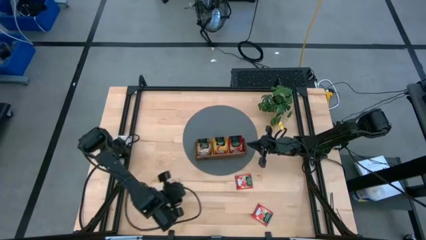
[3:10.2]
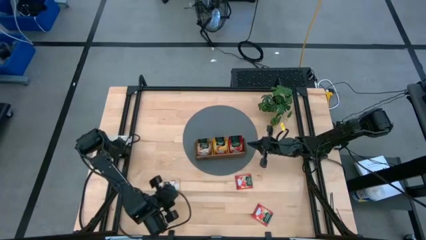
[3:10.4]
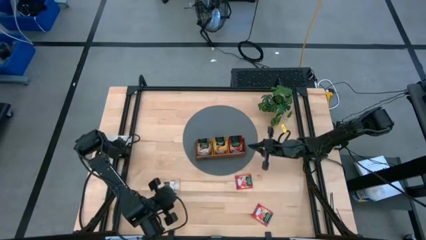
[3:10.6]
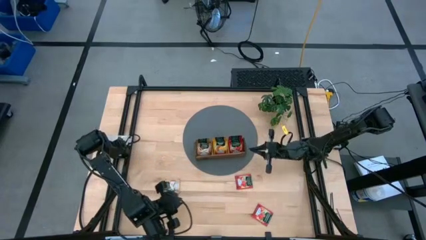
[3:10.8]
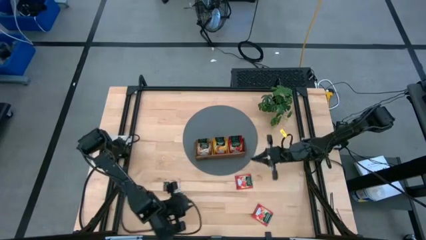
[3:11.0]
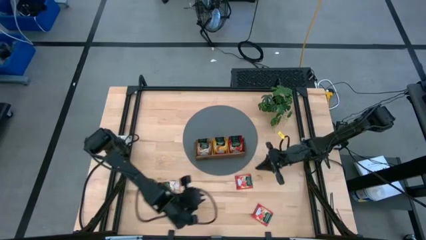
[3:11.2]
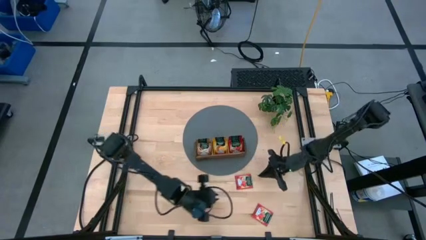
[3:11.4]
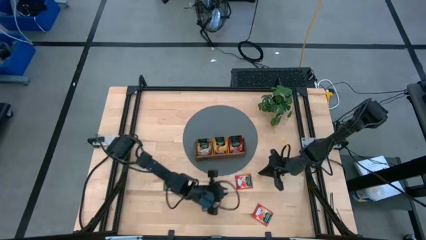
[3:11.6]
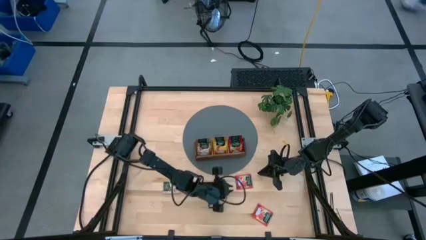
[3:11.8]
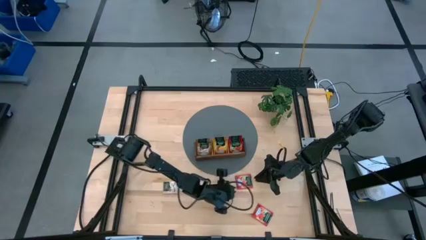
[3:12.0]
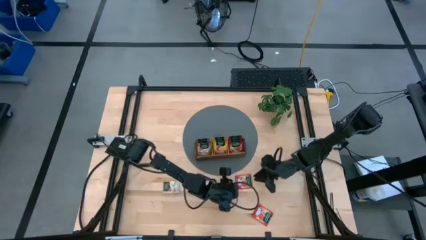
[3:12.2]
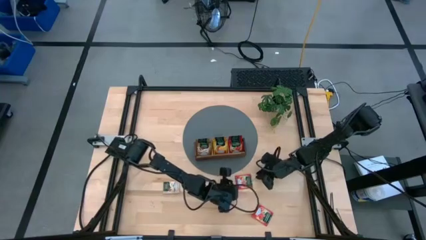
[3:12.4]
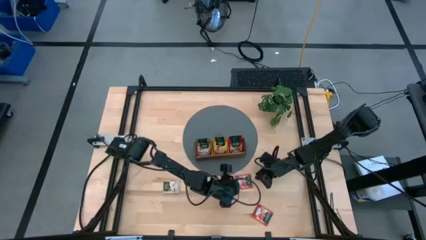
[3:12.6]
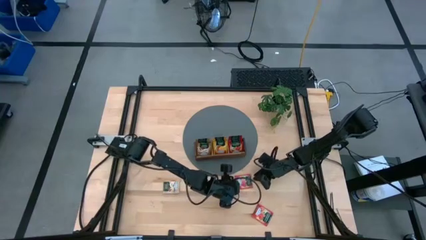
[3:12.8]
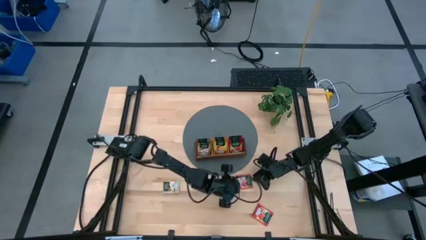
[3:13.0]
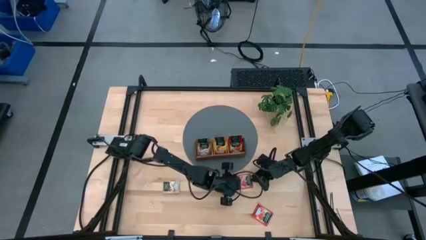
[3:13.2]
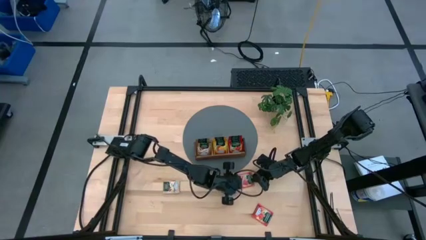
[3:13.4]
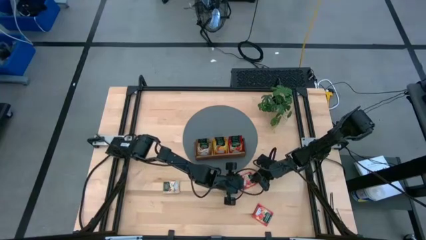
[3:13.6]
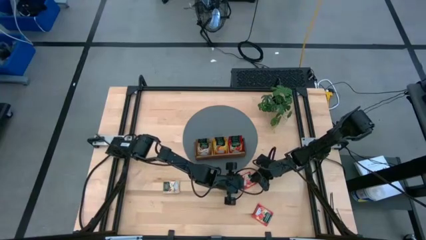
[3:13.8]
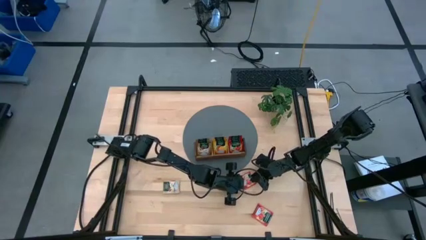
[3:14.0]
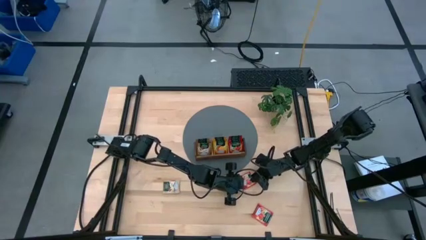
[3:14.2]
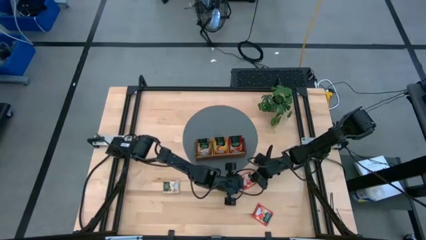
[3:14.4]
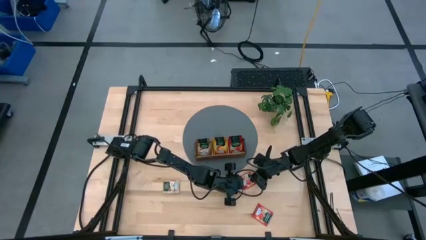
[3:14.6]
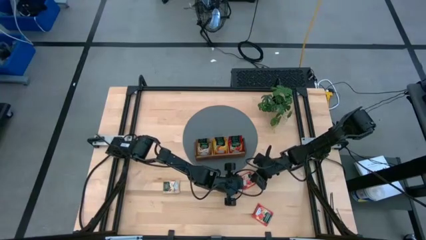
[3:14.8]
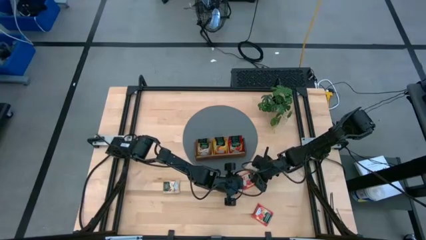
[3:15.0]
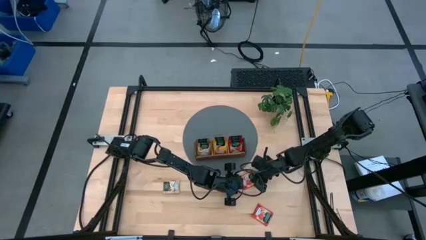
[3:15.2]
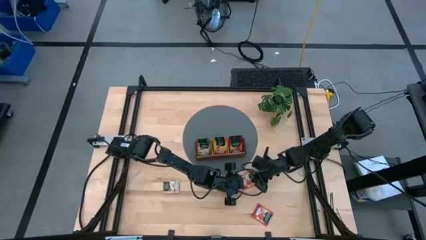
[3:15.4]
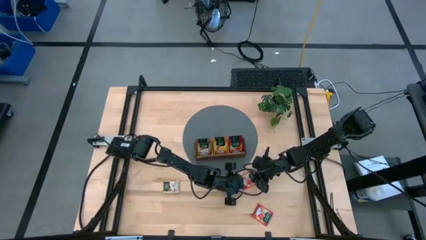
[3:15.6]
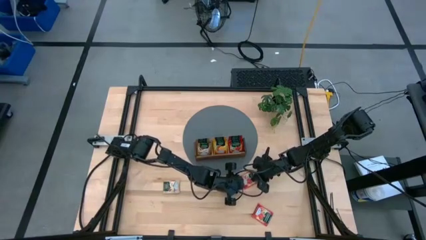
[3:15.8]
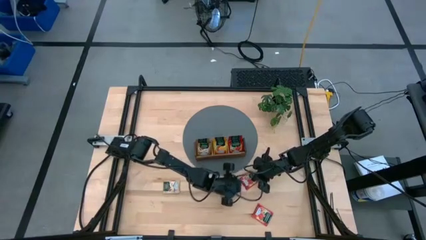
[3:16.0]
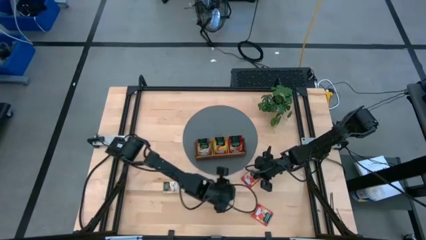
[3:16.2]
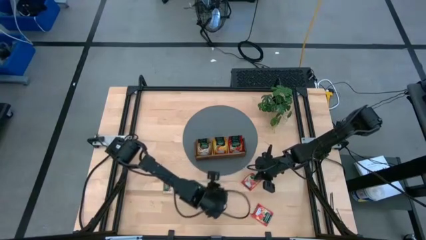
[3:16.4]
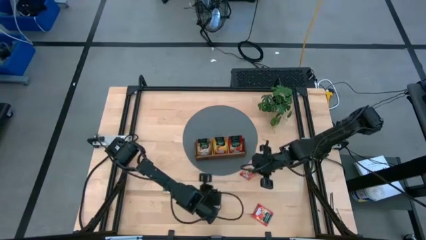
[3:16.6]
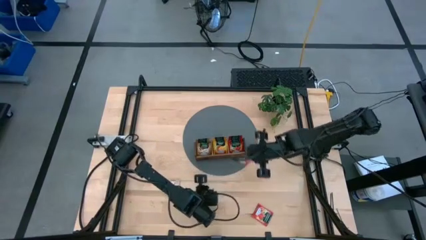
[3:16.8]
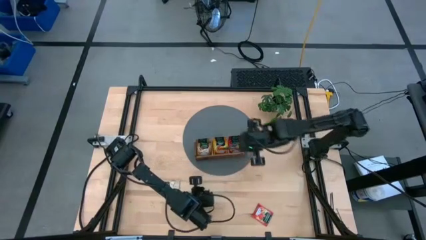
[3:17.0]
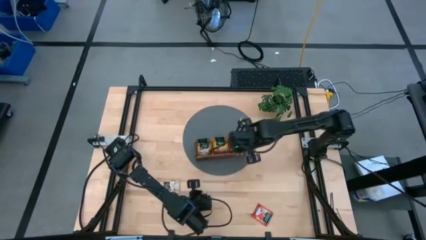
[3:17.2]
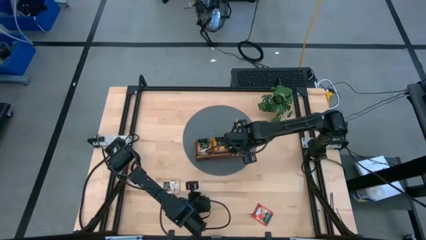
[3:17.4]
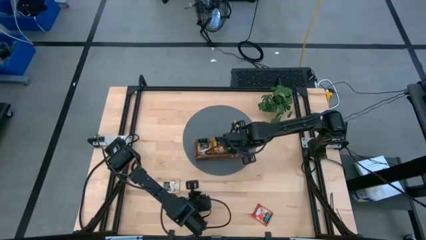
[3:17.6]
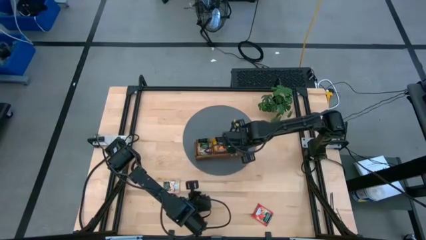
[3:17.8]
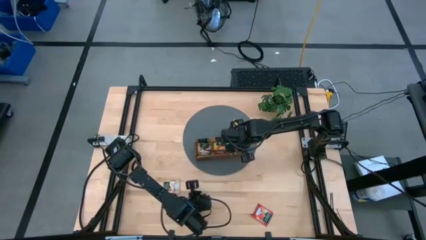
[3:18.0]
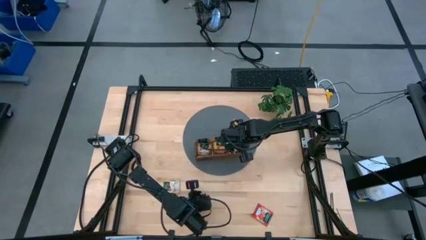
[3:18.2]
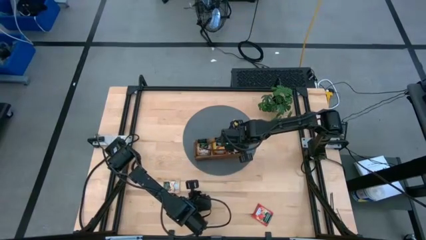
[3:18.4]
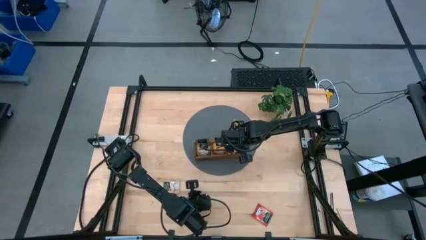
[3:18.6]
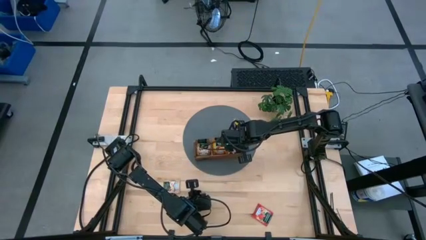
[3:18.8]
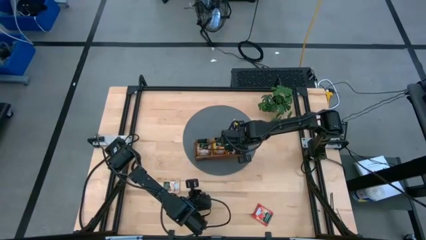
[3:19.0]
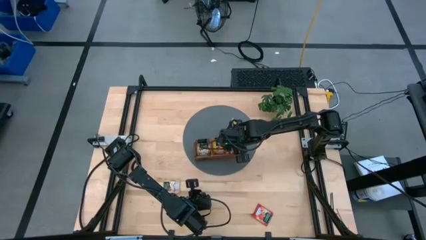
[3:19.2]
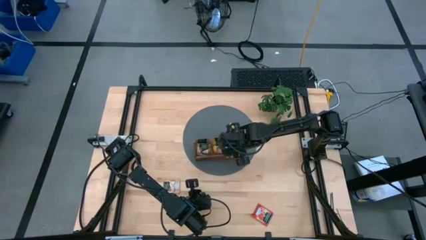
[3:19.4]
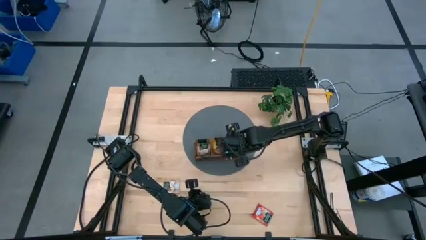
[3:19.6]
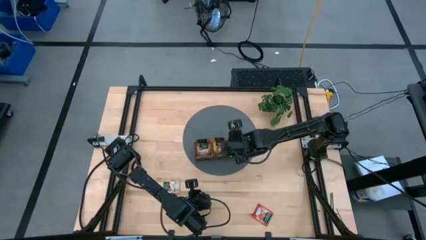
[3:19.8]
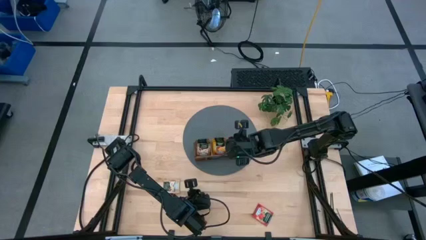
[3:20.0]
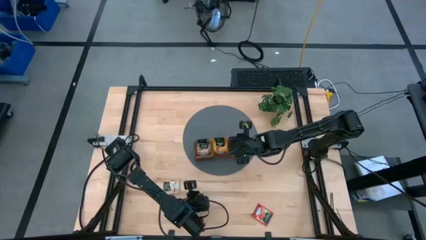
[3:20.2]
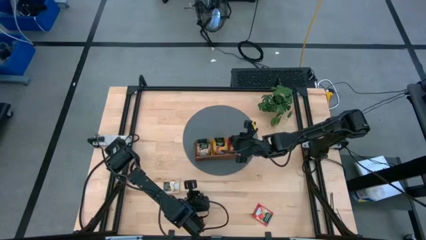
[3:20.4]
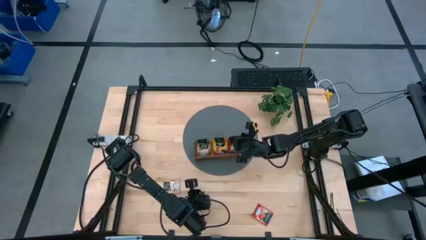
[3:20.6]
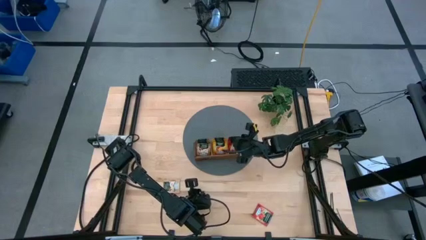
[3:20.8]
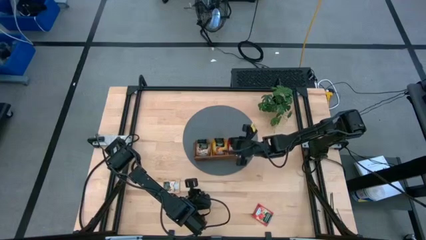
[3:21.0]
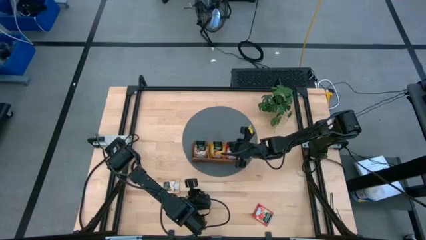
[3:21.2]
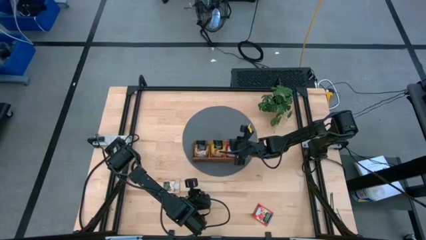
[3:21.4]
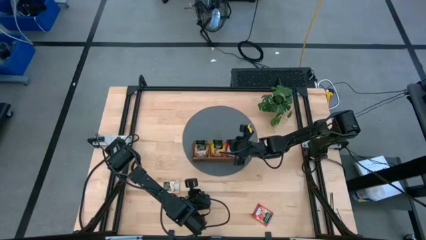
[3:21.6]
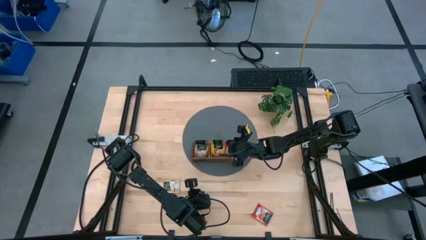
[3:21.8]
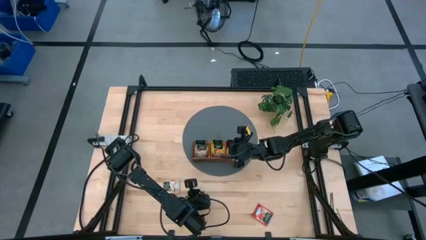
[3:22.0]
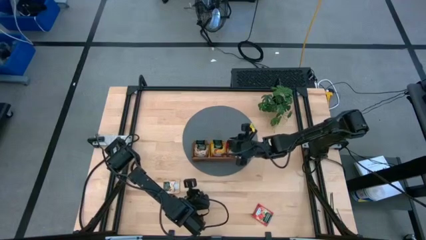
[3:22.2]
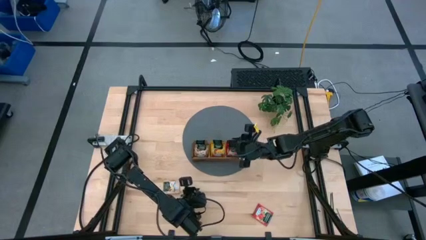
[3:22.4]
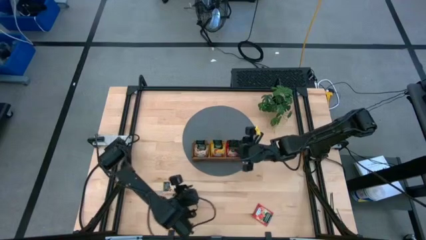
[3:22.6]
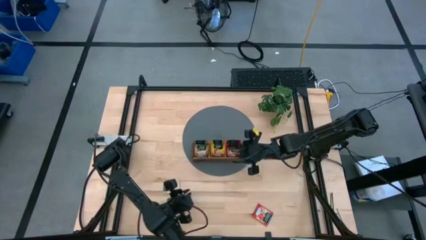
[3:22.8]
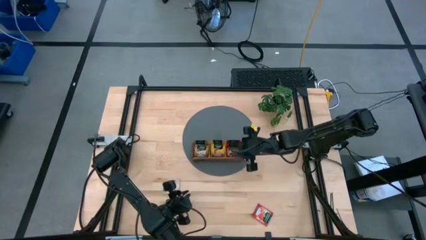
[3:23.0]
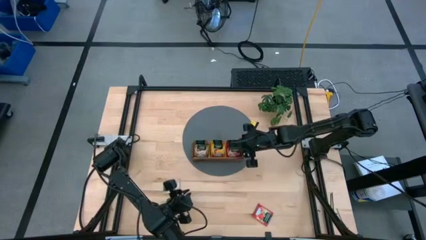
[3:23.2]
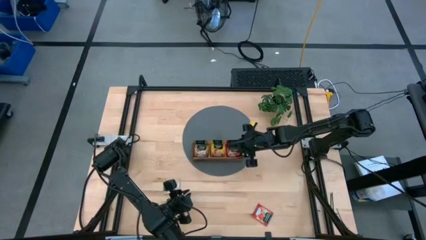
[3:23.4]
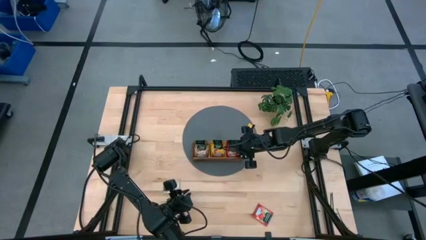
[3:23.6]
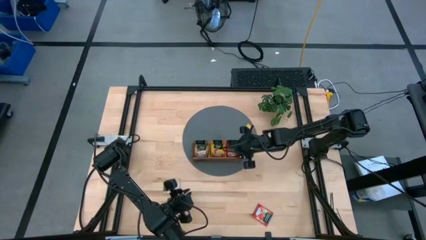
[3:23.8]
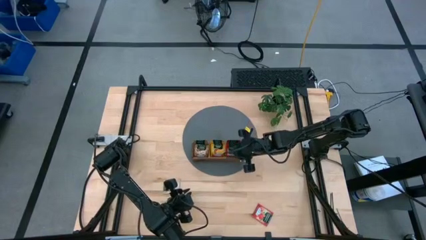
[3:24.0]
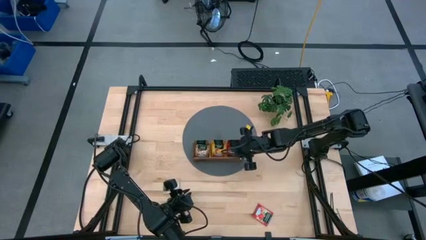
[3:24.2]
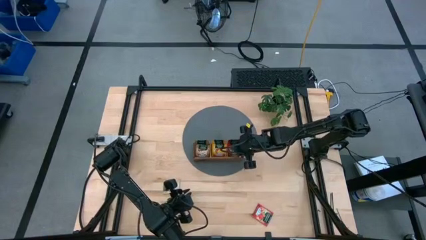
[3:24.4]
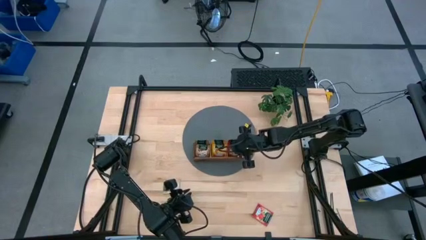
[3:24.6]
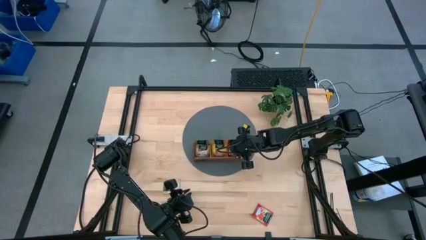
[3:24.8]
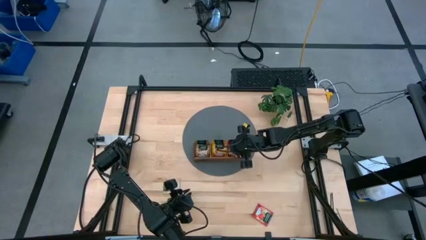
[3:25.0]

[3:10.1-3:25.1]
Task: Pick & Place Tea
Put the red tea bag into the right section of the wooden organizer
